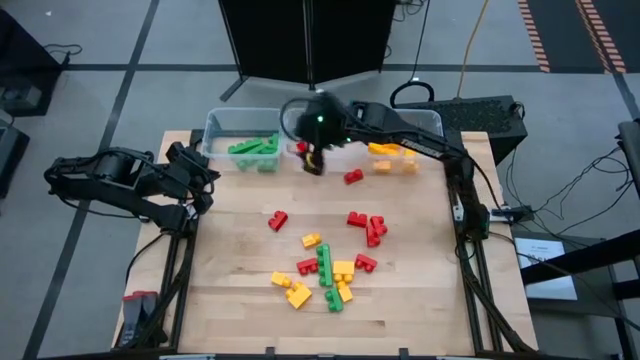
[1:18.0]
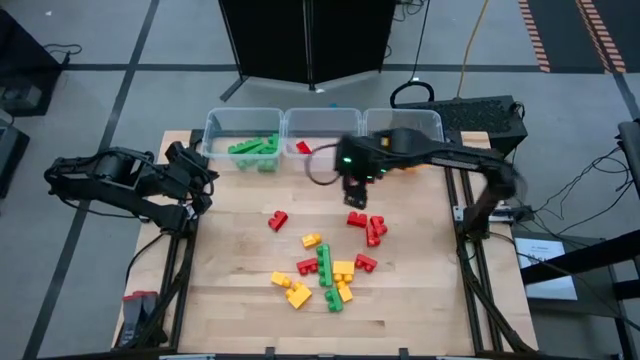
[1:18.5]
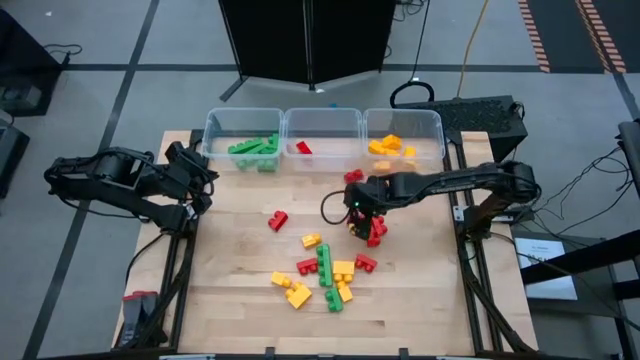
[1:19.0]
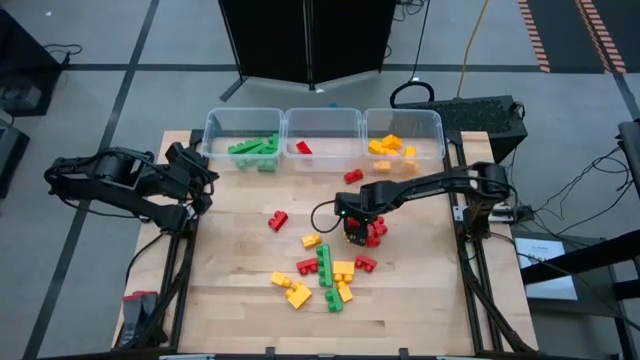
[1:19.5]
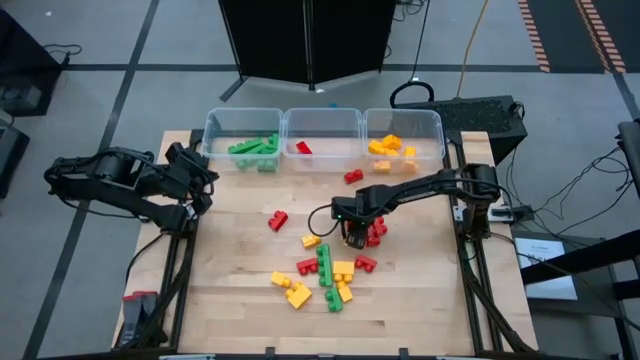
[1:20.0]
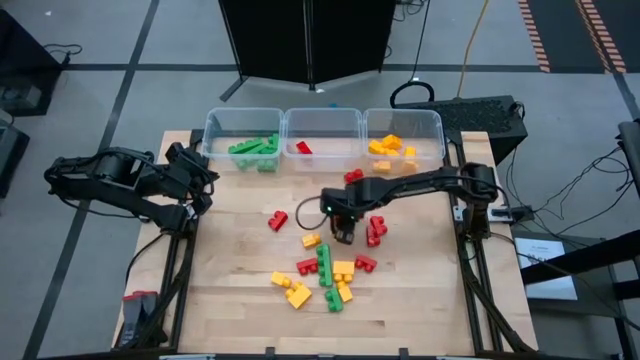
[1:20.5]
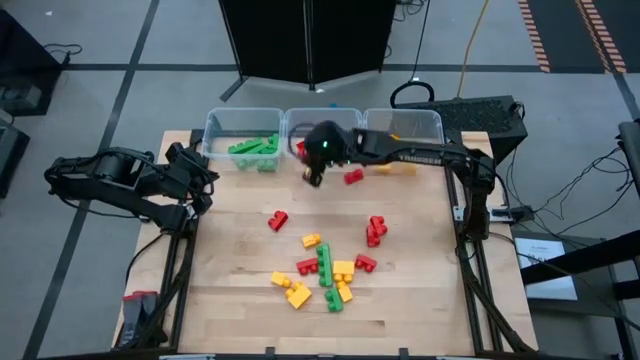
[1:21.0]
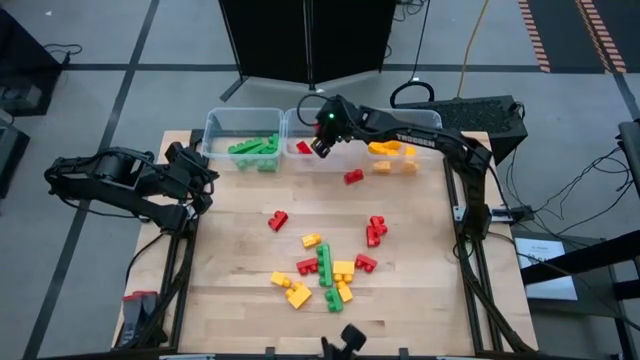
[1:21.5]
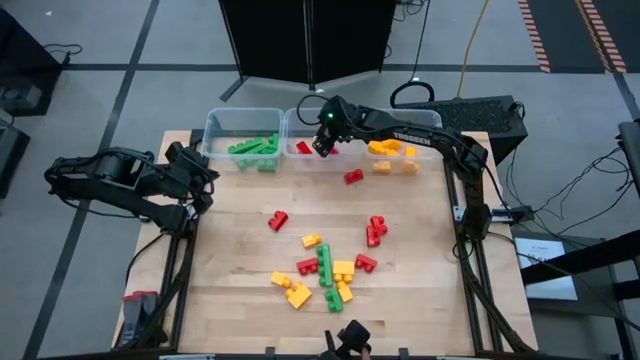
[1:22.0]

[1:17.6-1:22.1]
Task: Sort blocks
Put the red game piece with 2 studs into the center transparent bin

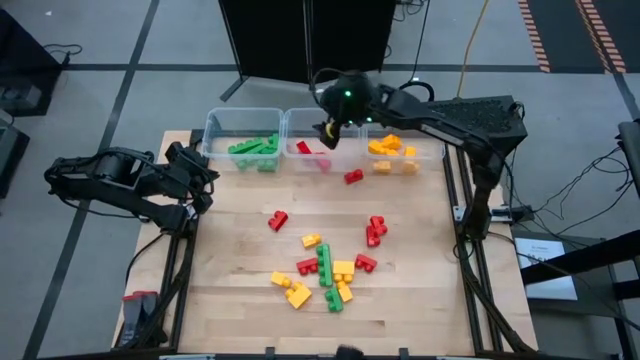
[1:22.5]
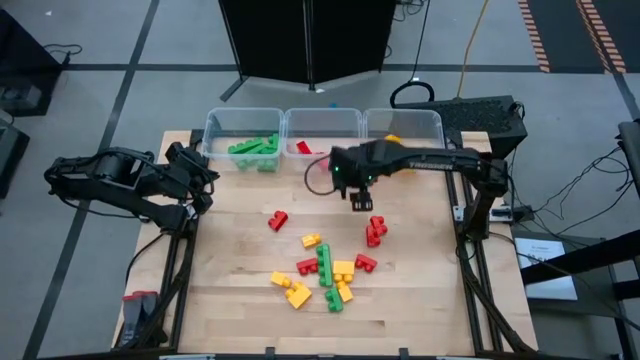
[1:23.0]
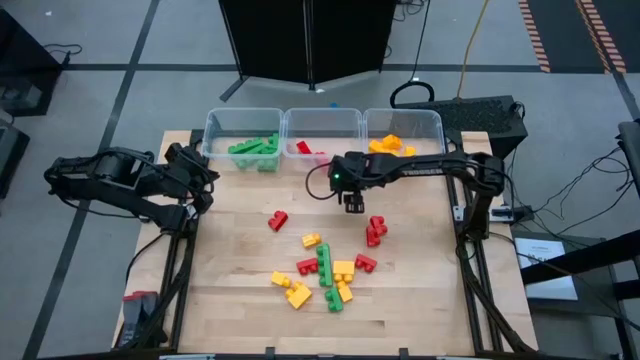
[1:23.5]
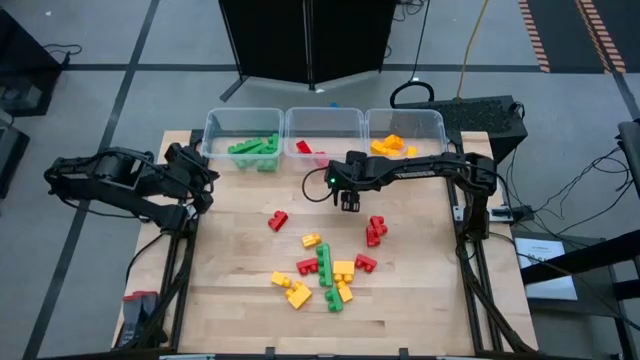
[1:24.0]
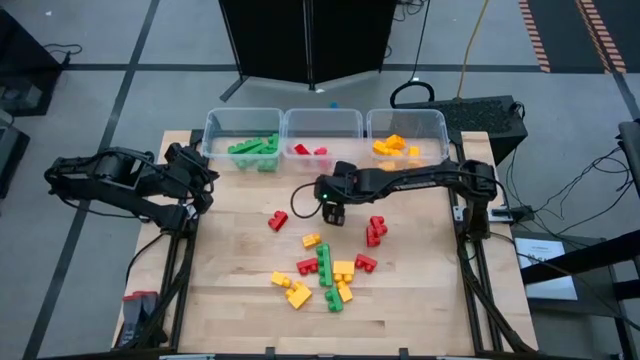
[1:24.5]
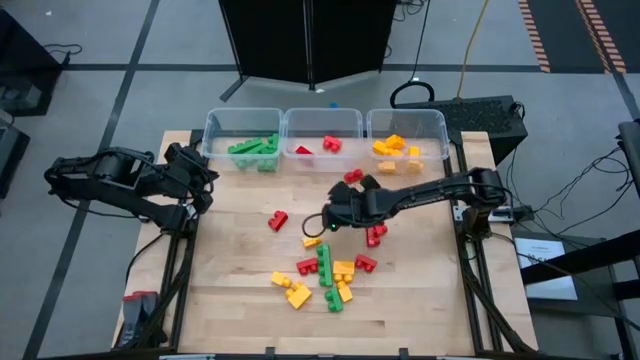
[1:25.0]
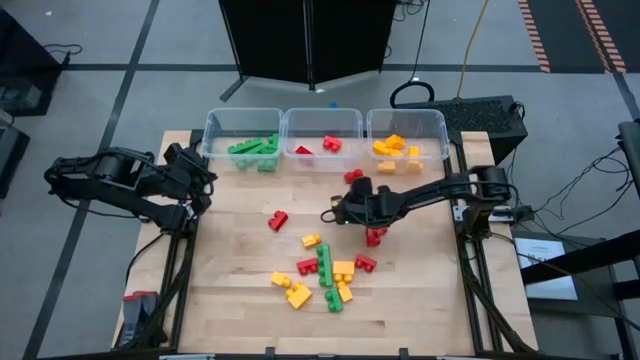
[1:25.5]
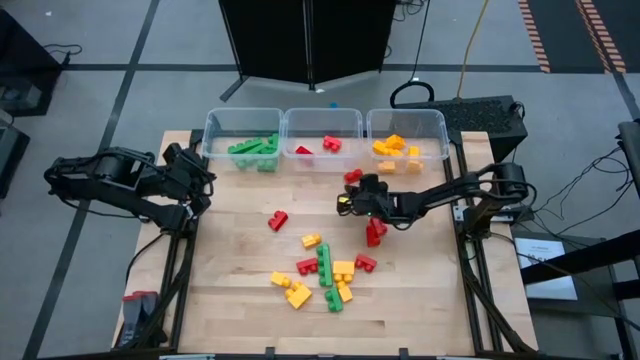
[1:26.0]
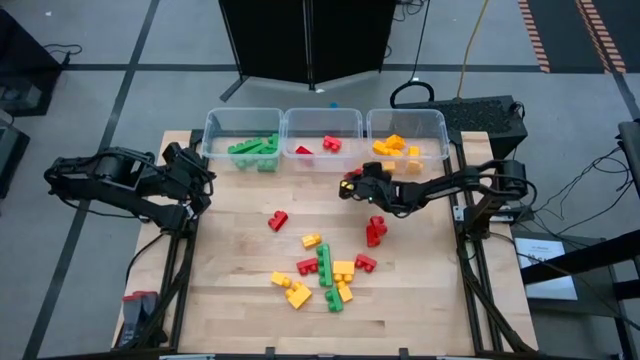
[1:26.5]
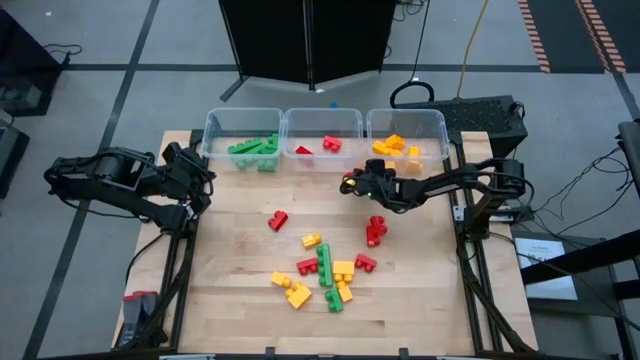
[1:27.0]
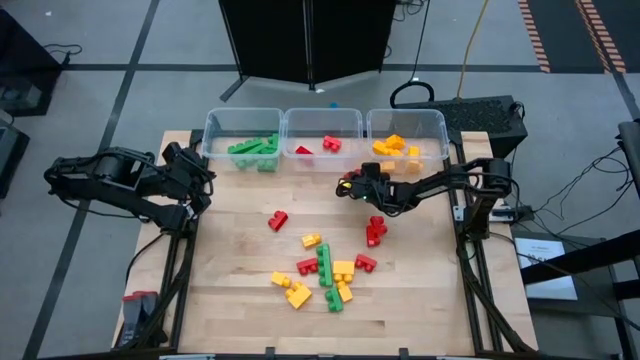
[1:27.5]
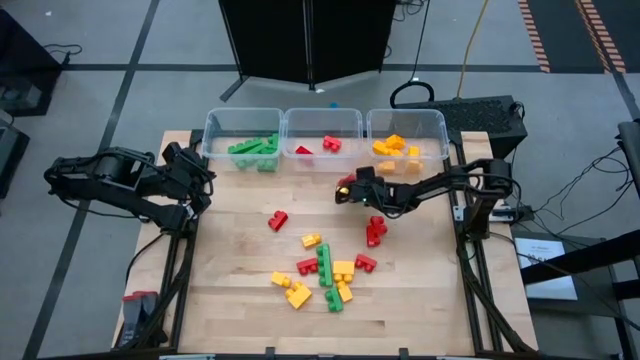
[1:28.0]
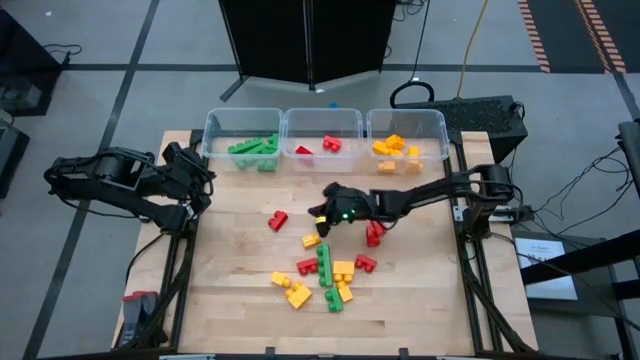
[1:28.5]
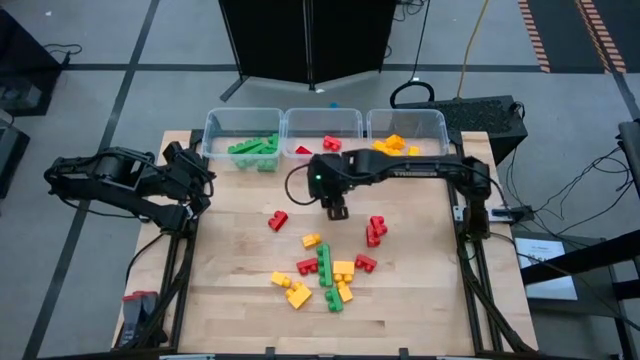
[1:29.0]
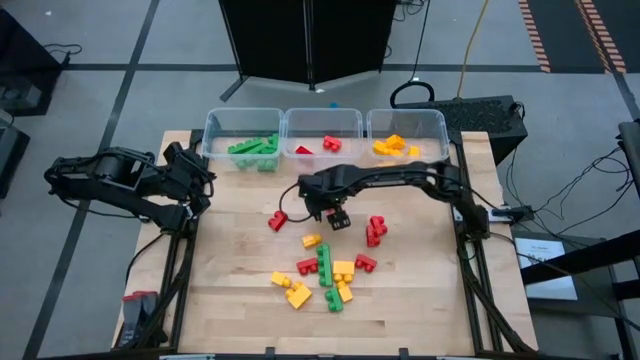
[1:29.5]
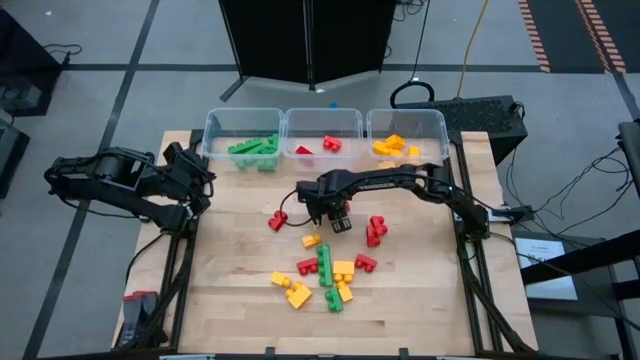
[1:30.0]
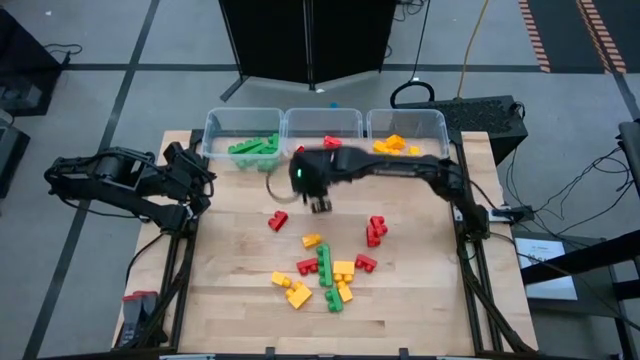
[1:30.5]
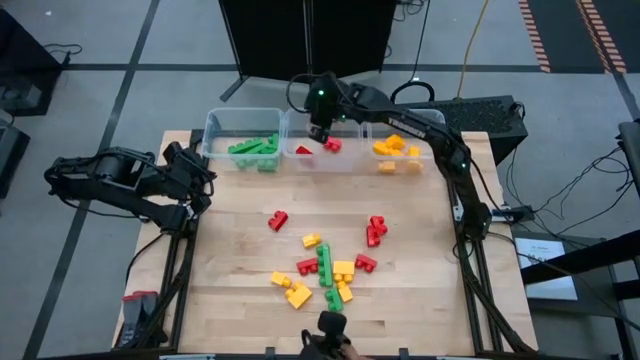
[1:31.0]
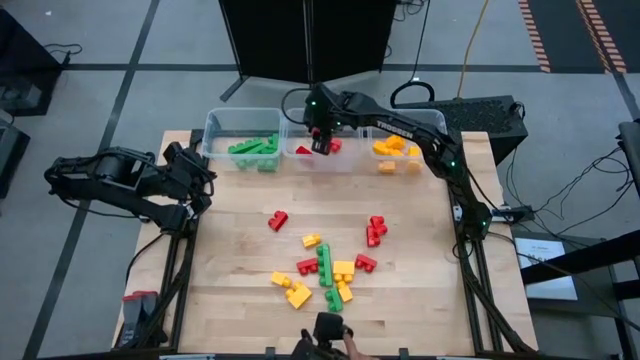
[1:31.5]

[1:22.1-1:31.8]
Put the red game piece with 2 studs into the center transparent bin

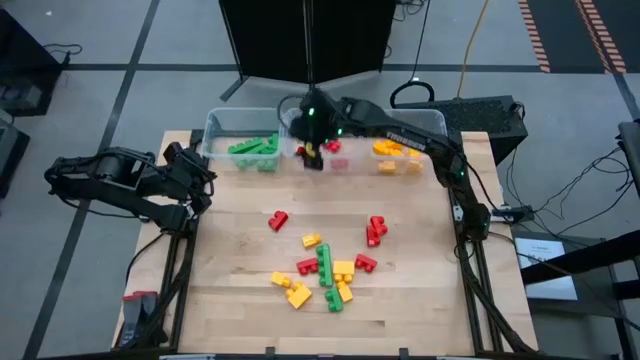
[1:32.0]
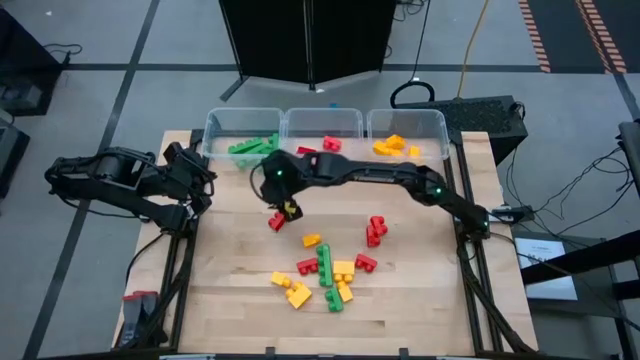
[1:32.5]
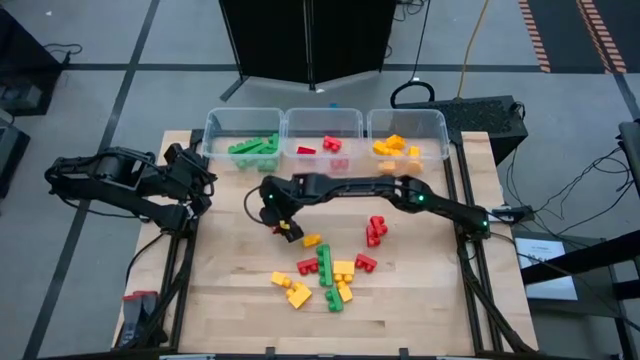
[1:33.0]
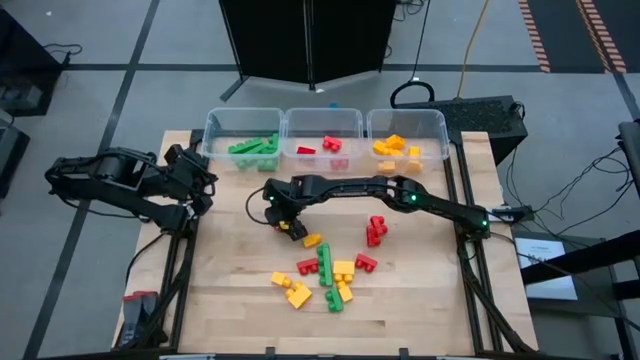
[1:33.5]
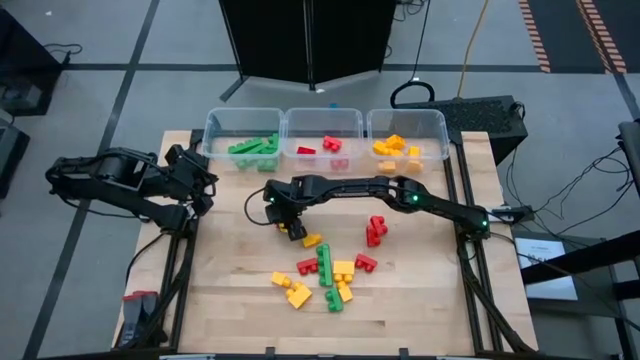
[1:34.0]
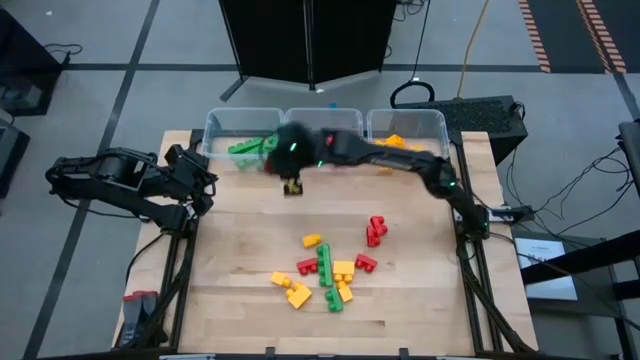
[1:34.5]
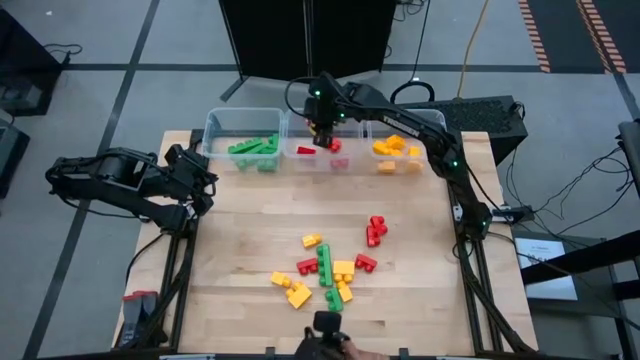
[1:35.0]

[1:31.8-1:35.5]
Put the right red game piece with 2 studs into the center transparent bin

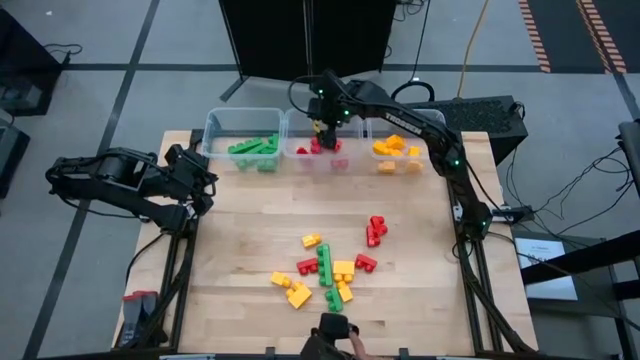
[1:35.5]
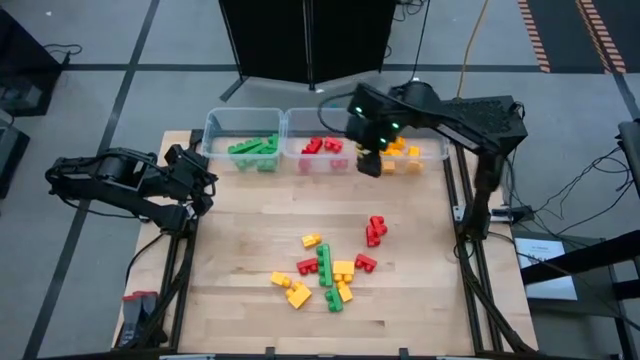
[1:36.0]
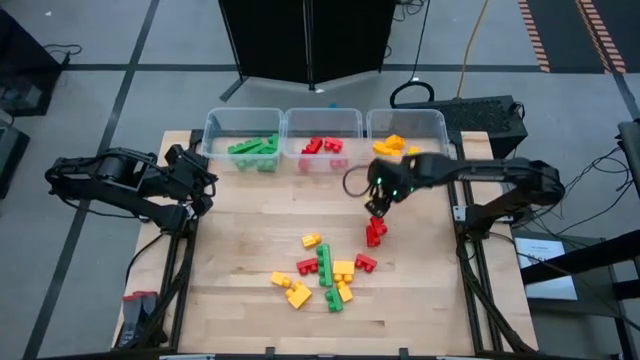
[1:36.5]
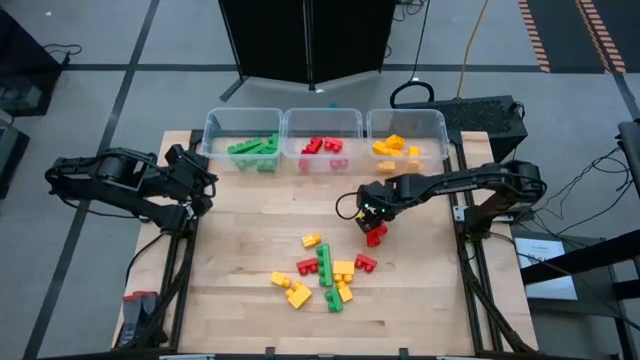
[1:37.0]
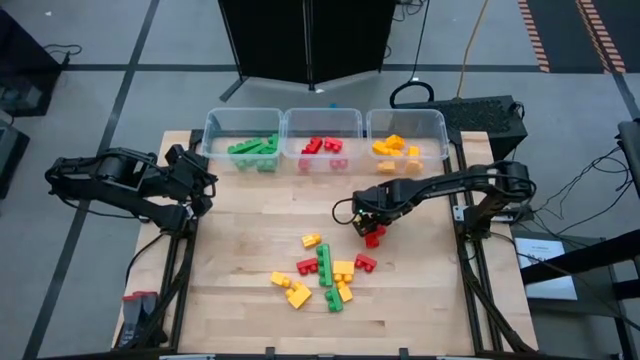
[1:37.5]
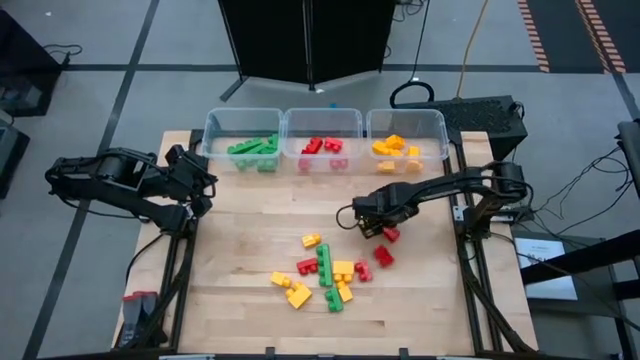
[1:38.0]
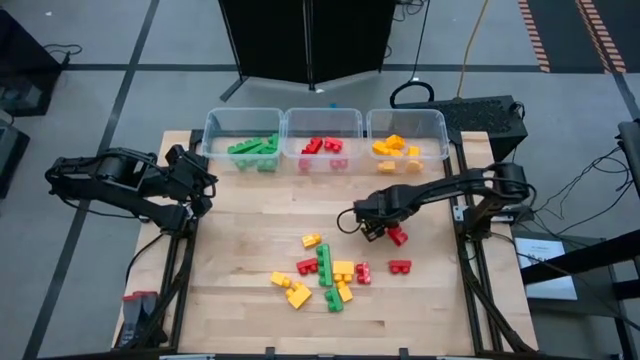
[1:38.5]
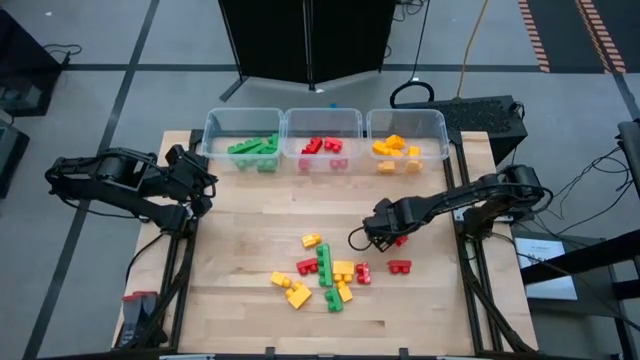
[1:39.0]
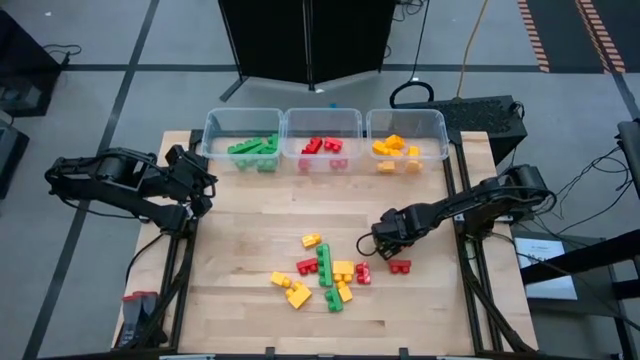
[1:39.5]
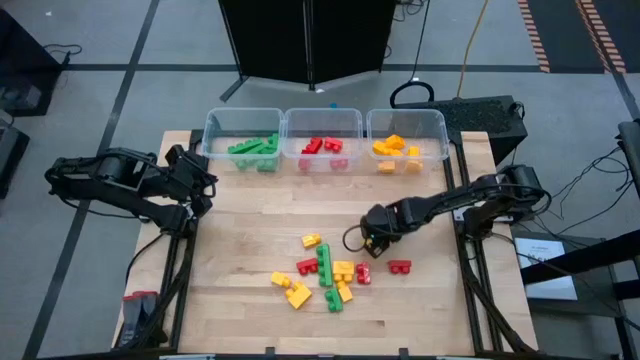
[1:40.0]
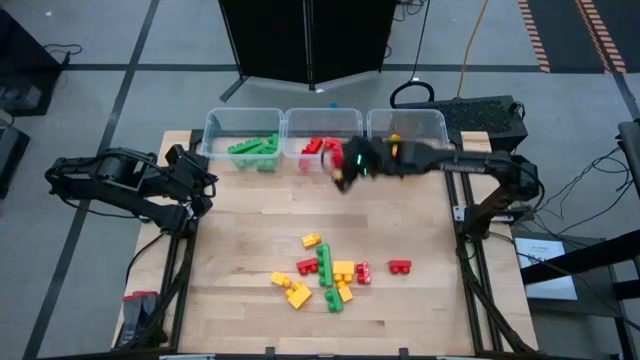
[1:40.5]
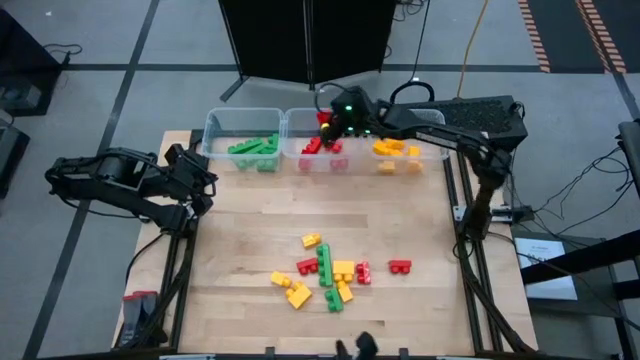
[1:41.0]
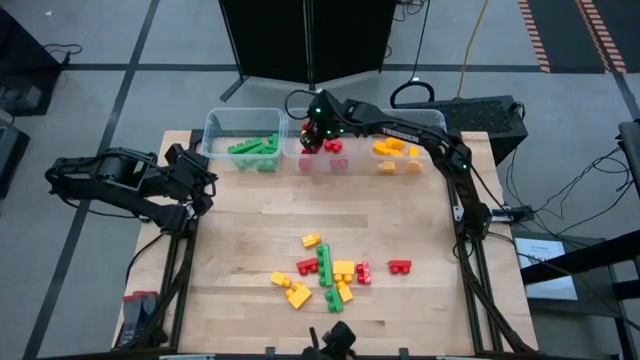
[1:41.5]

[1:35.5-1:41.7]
Put the red game piece with 2 studs into the center transparent bin
